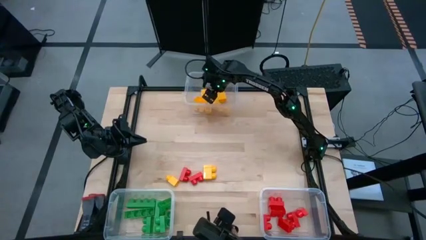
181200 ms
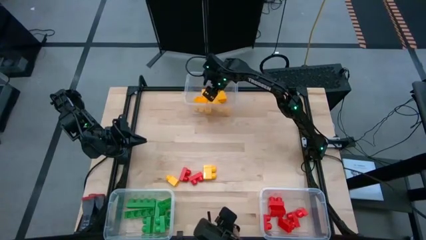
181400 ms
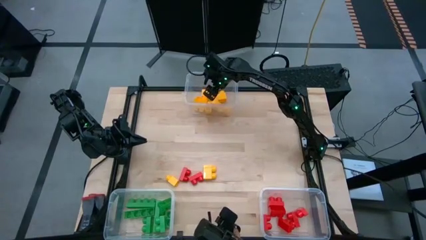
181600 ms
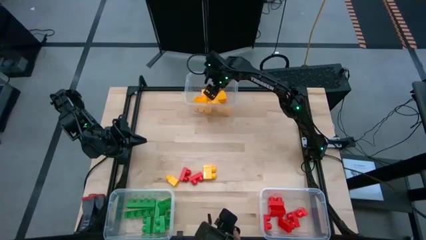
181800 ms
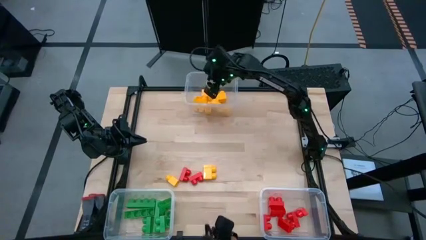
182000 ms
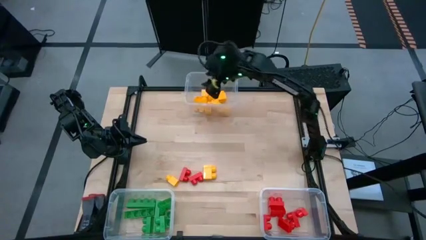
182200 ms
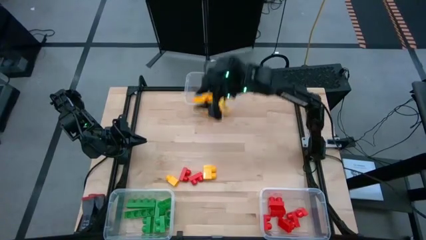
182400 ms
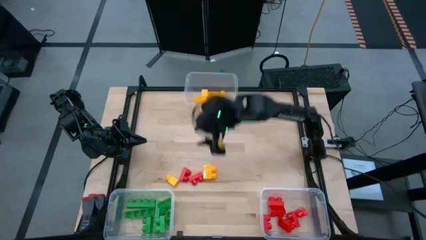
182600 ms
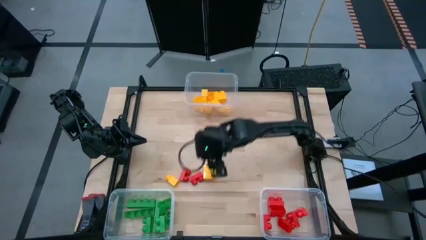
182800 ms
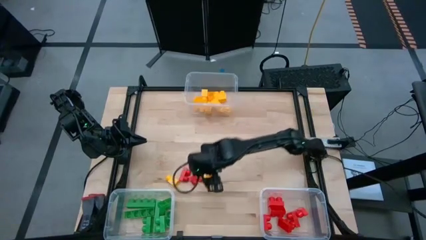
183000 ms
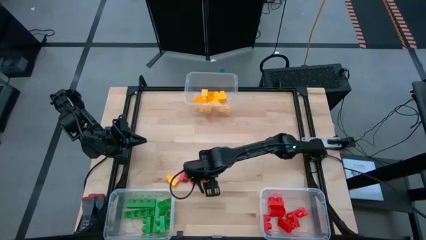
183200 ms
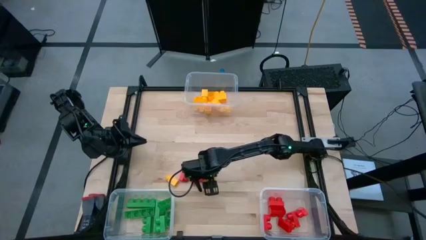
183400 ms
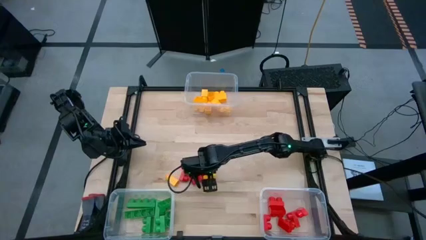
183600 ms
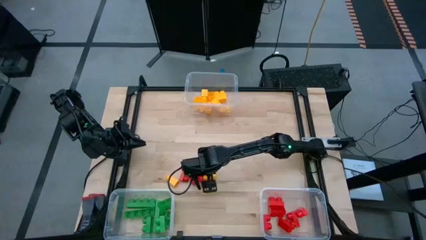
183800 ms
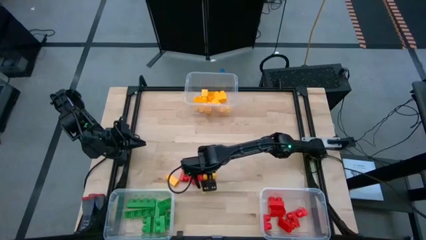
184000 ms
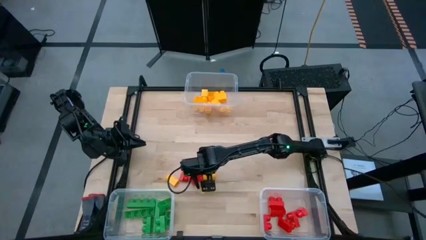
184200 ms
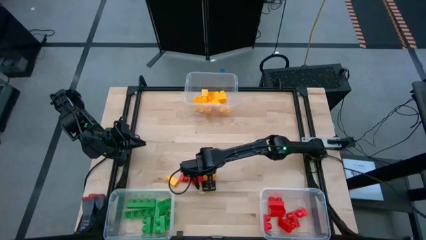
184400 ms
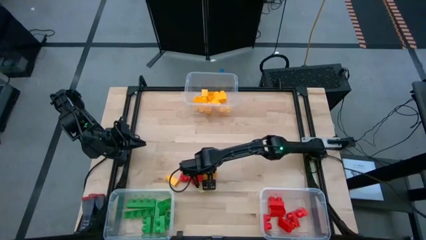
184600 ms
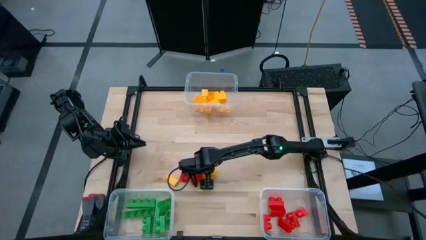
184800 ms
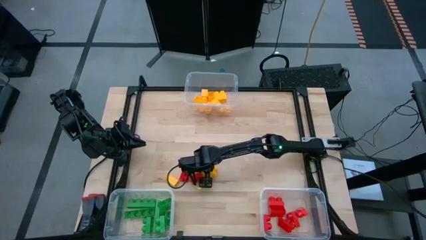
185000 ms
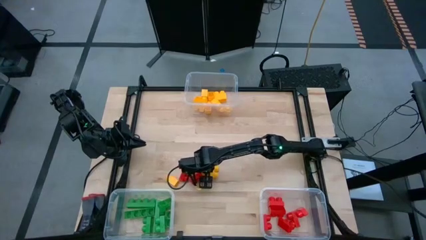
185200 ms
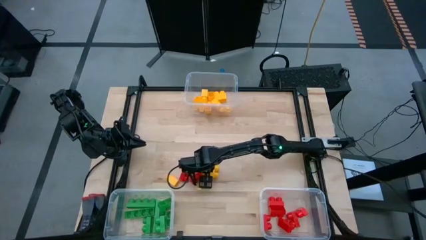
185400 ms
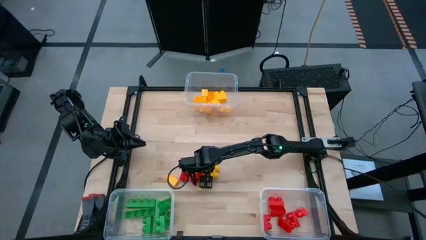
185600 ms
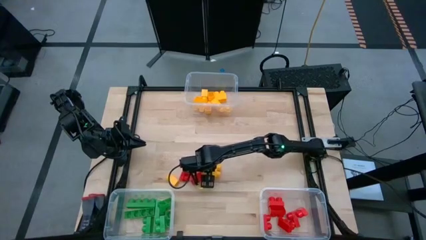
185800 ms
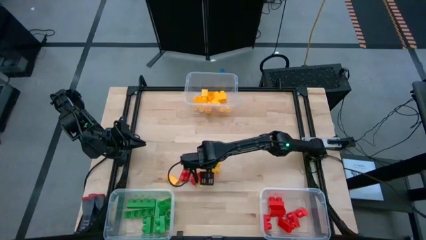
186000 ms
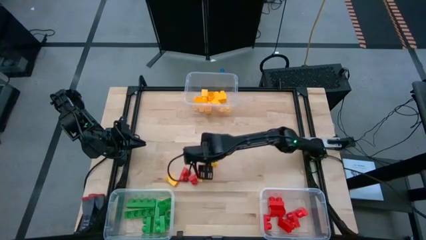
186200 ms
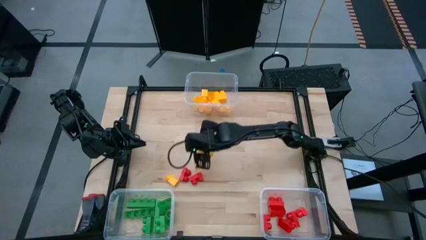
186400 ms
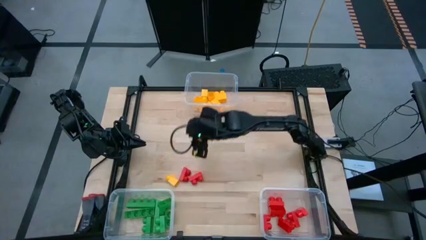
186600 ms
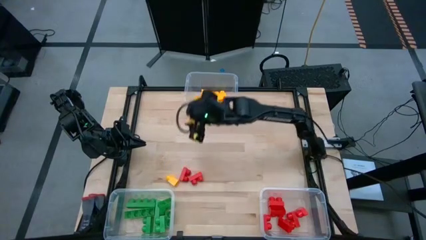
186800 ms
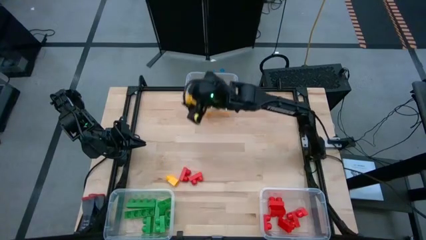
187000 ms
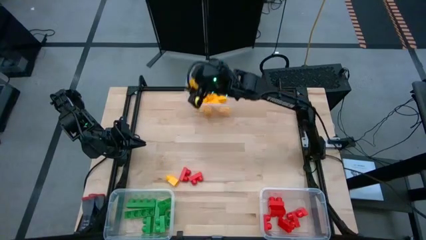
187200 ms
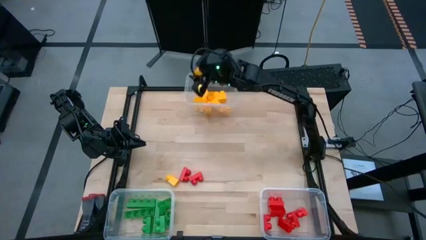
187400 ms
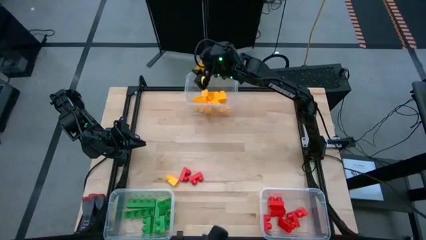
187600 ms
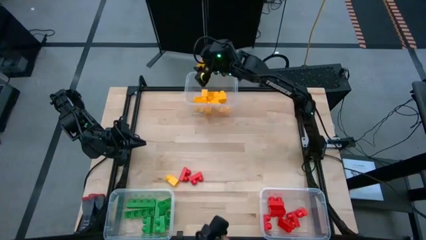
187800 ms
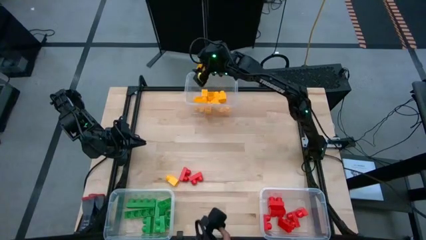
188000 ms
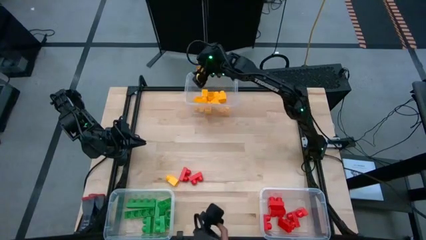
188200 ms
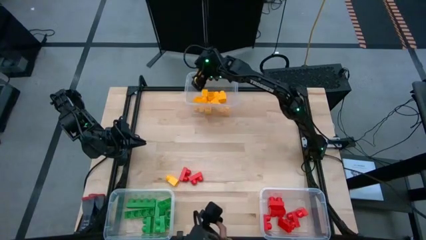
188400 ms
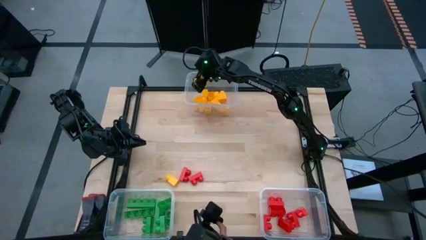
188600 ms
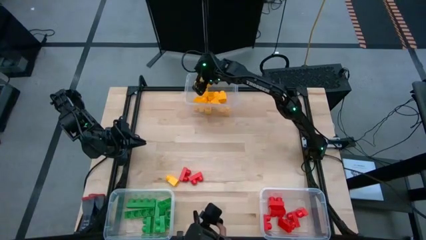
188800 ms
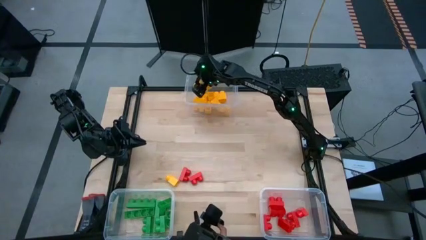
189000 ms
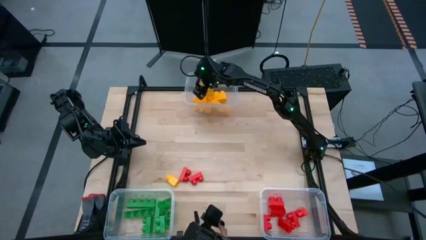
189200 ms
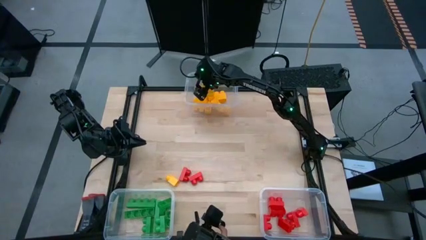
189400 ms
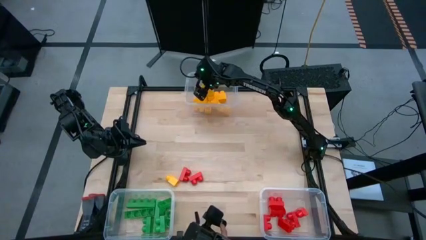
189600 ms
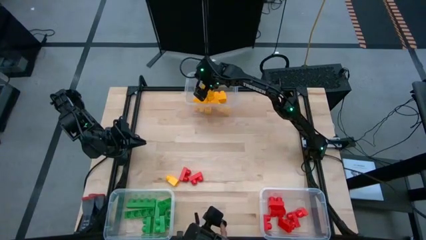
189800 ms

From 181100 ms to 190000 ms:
Task: Sort blocks
Put the yellow game piece into the top transparent bin

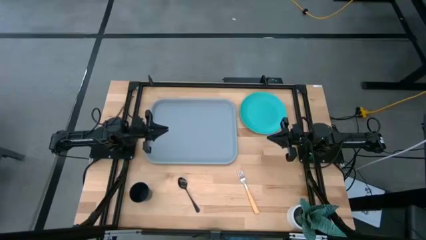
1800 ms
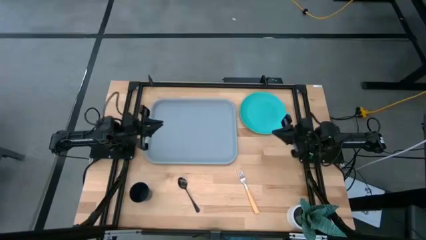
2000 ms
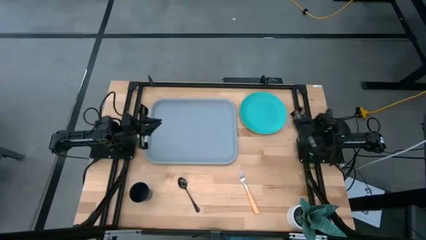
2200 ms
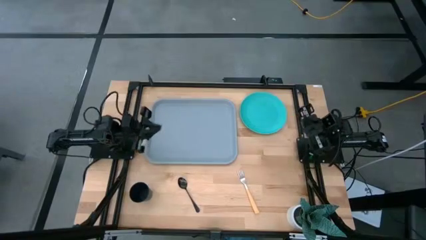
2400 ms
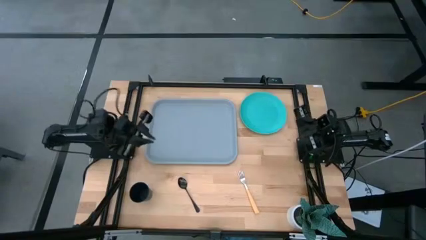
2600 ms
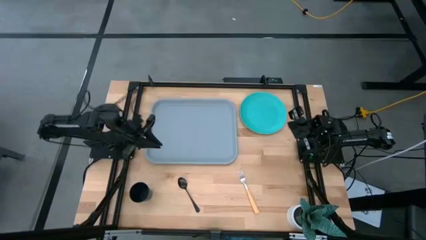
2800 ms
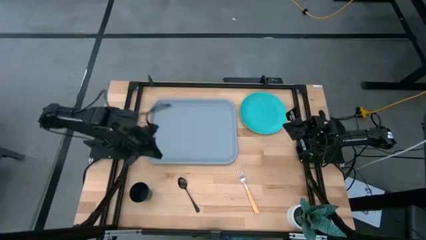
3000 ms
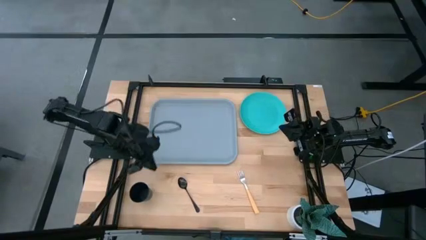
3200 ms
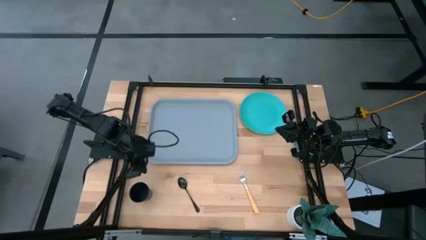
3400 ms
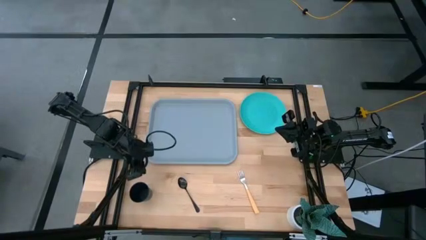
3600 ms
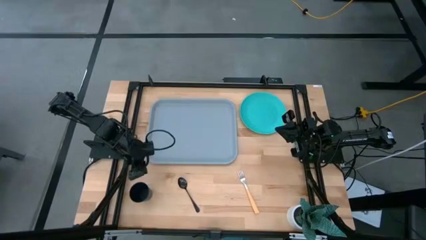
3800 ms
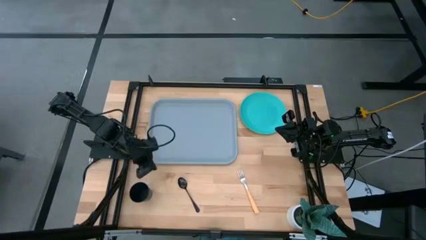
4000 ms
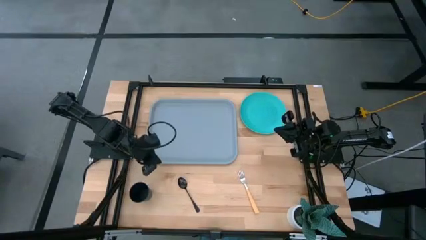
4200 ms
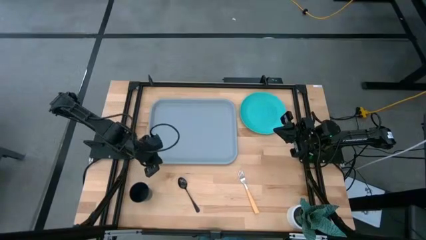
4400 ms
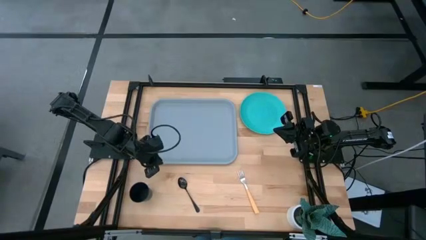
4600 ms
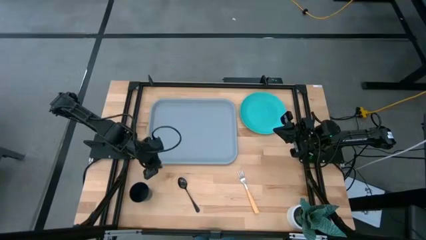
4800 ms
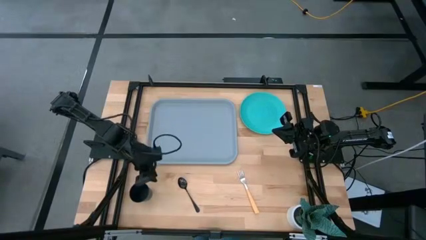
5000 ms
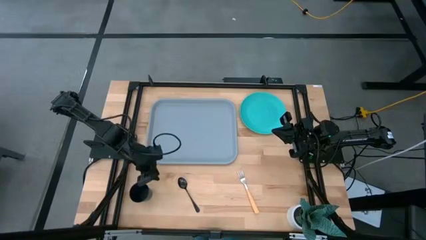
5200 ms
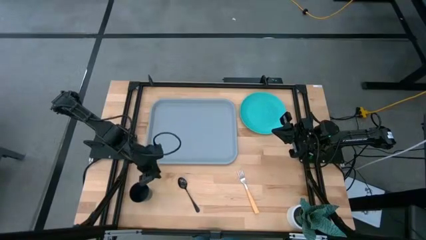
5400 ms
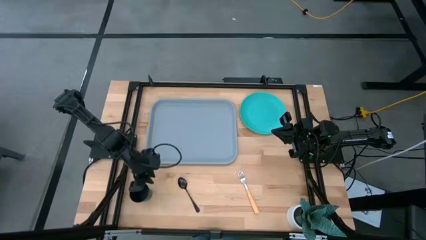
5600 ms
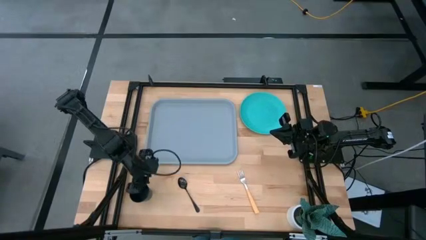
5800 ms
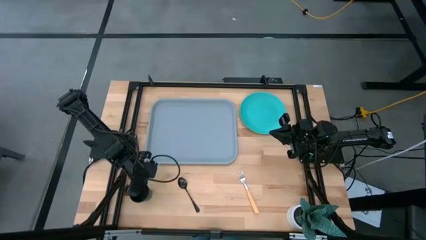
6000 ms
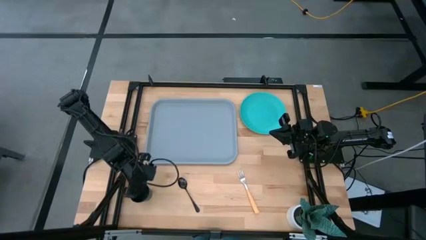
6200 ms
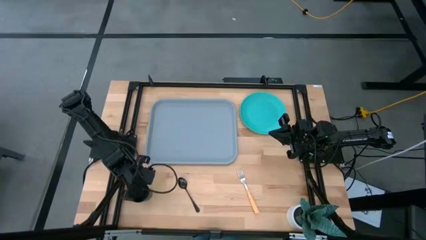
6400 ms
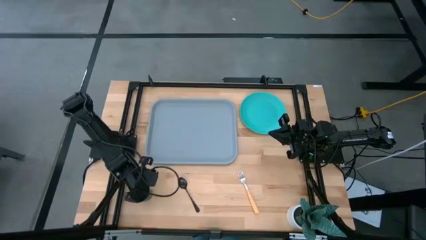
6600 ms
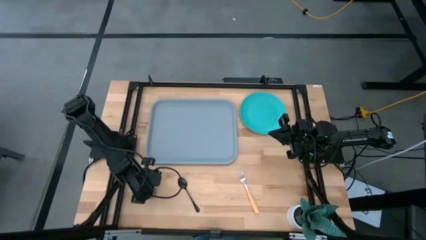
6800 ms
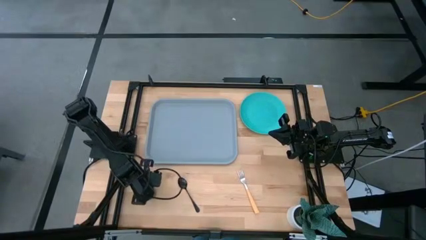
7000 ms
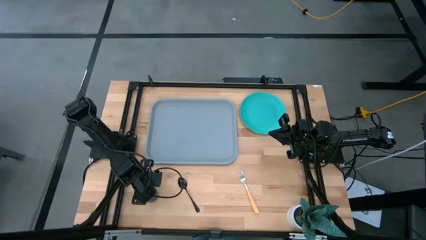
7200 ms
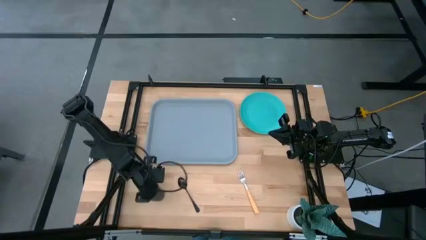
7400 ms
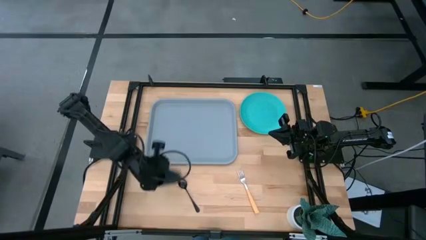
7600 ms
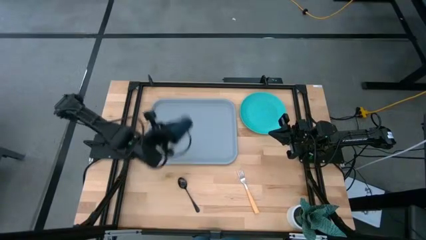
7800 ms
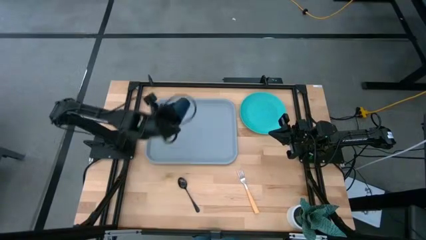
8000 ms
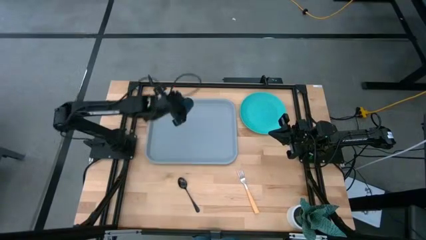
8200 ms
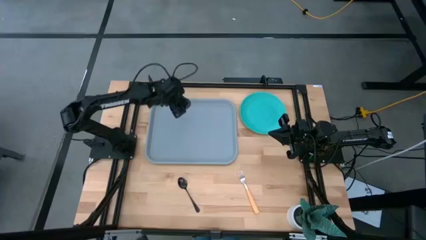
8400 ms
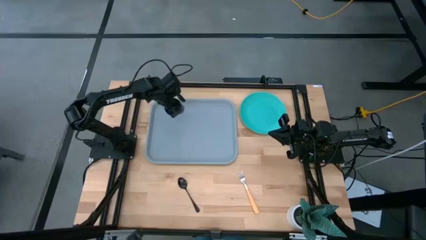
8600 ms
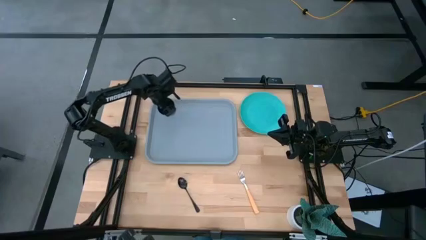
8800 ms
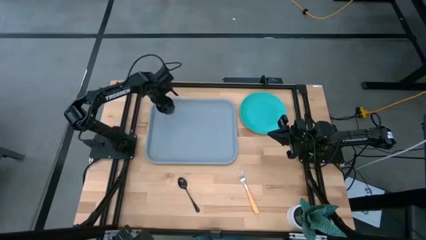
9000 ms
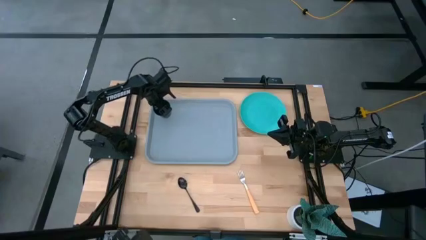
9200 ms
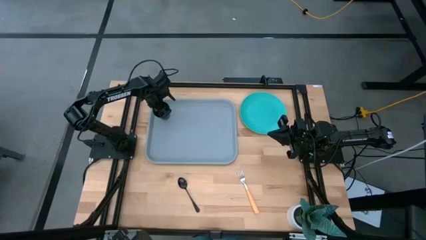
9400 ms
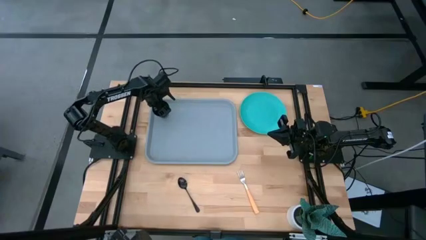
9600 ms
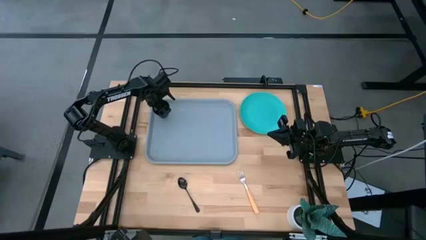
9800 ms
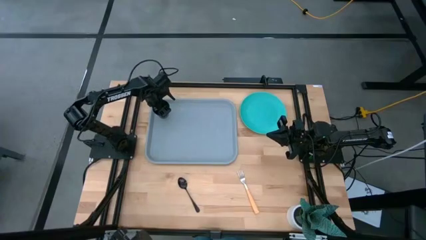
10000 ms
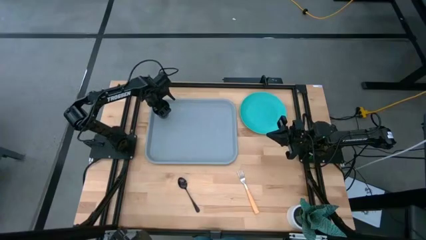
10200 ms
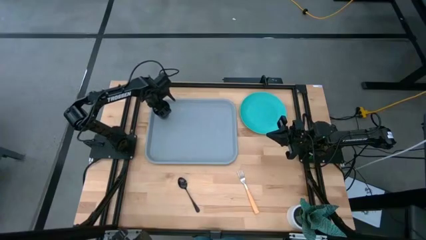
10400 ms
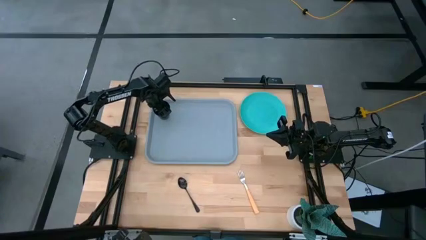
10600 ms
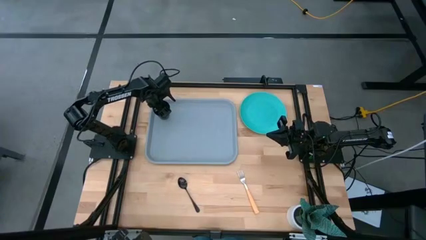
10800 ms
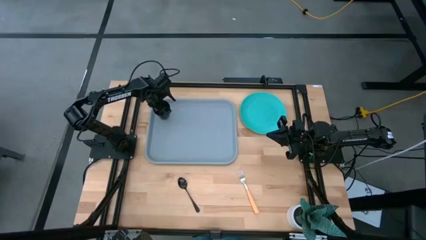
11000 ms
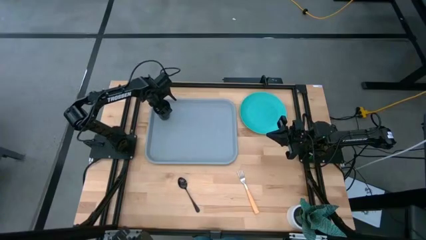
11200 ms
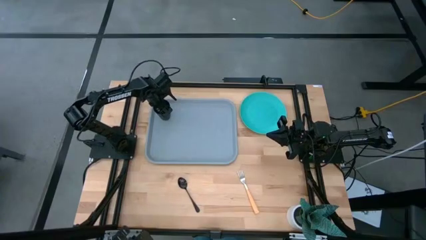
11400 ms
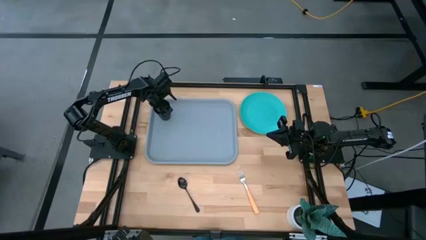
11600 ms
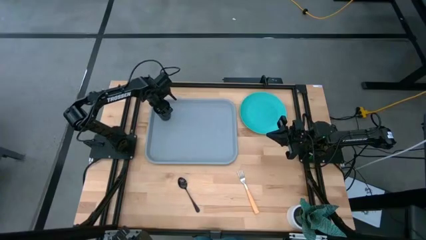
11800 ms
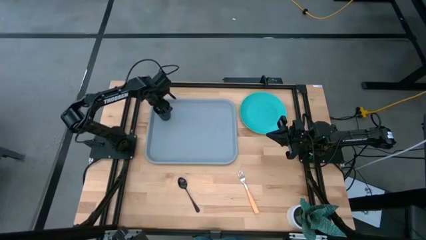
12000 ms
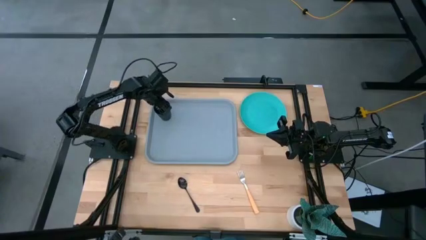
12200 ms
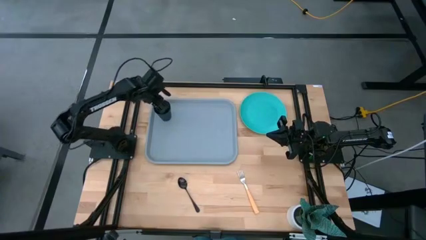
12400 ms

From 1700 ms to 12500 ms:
Task: Pick and place plate/cup/fork/spoon on tray
Put the black cup on the gray table tray
